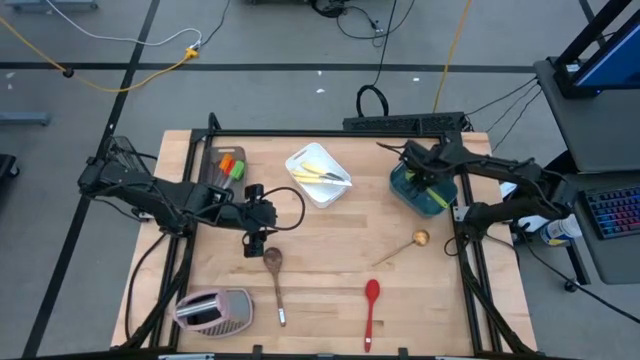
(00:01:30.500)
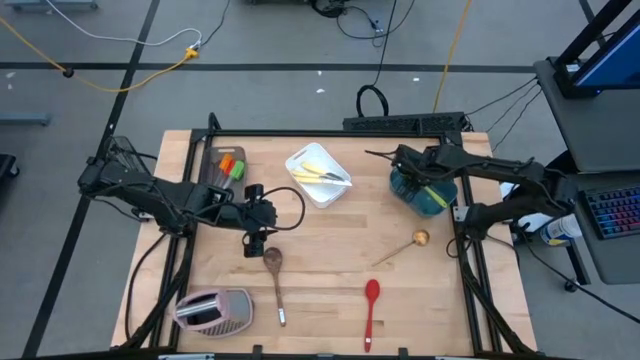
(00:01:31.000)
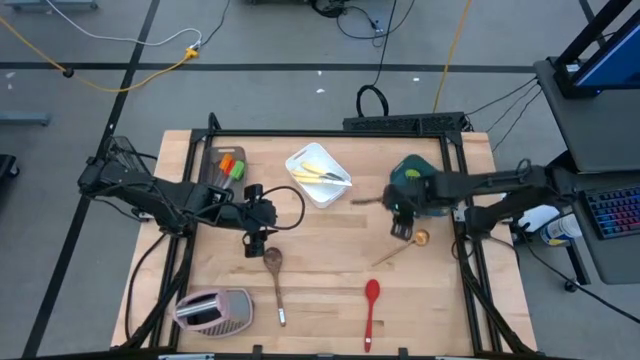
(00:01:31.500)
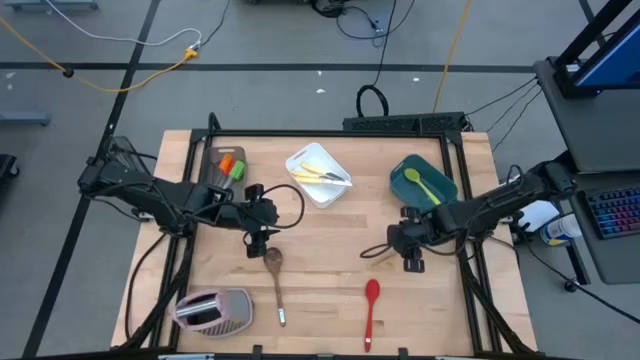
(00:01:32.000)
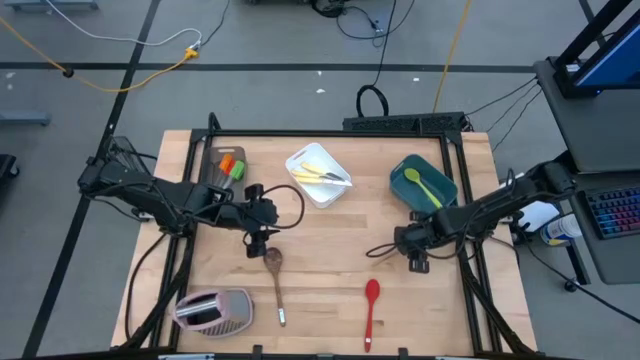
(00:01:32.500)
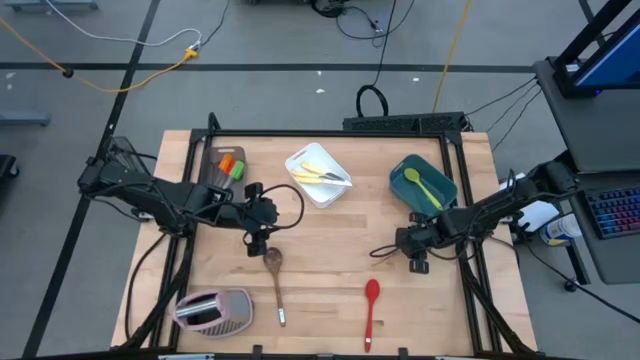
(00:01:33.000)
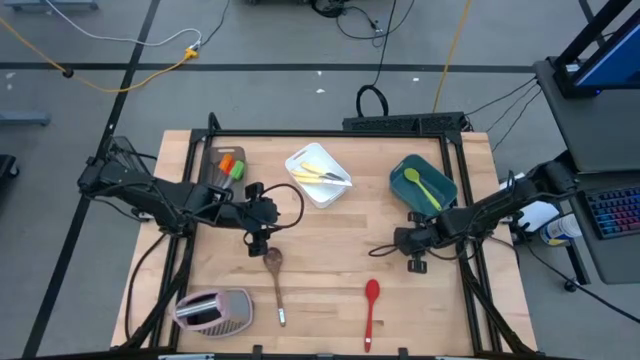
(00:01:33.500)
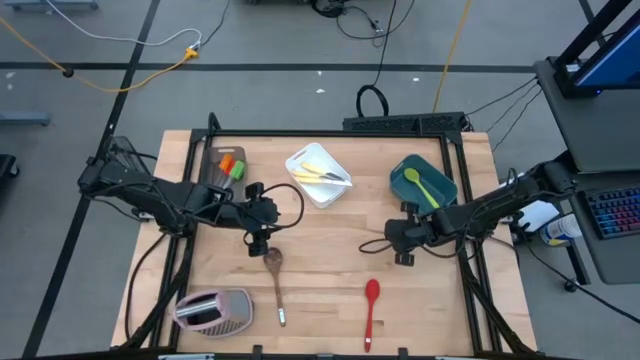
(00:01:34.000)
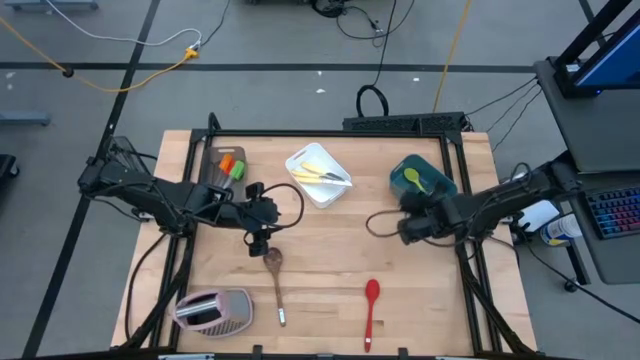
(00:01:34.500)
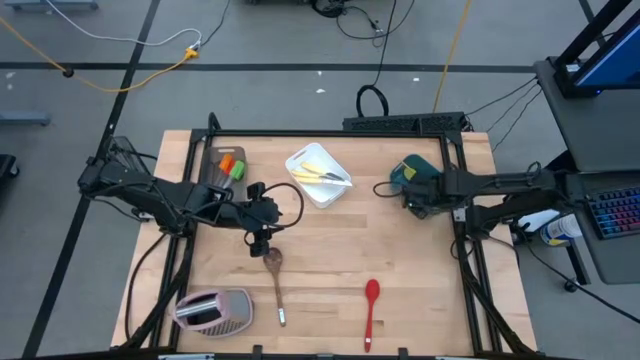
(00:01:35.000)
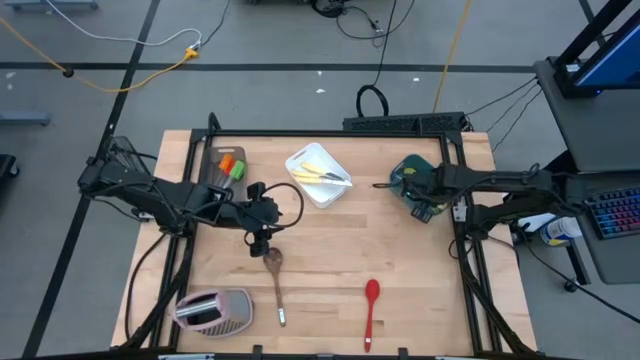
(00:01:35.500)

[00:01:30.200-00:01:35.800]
Task: Pick & Place Kitchen Items
Put the gold spoon into the blue bin

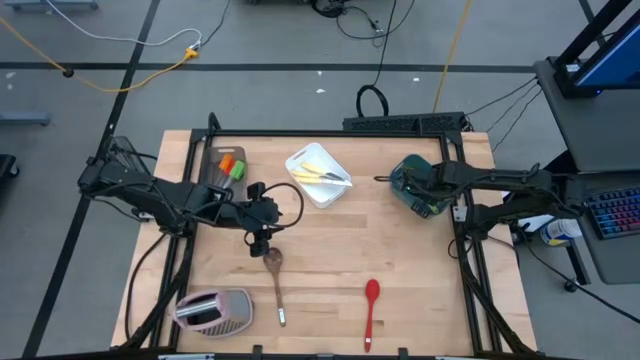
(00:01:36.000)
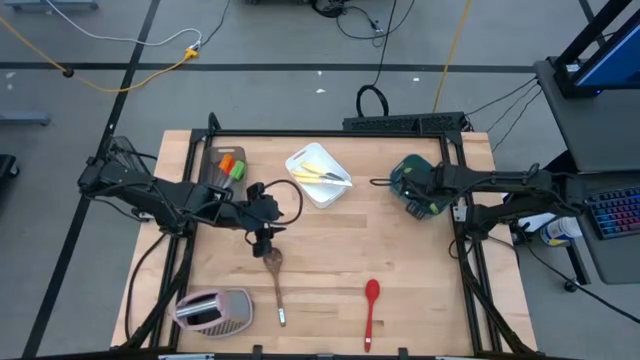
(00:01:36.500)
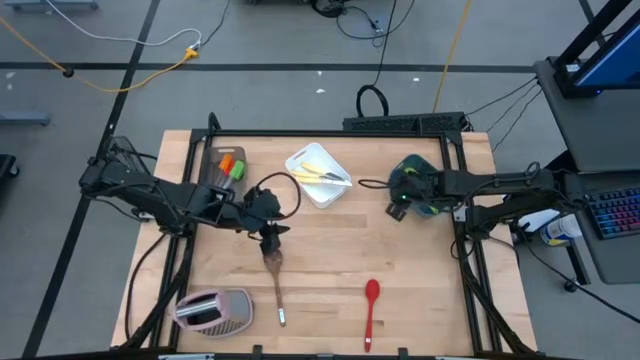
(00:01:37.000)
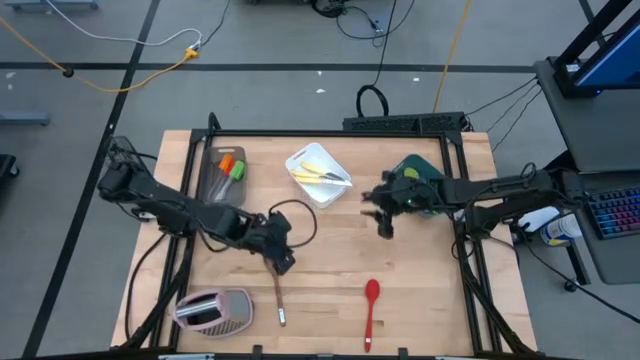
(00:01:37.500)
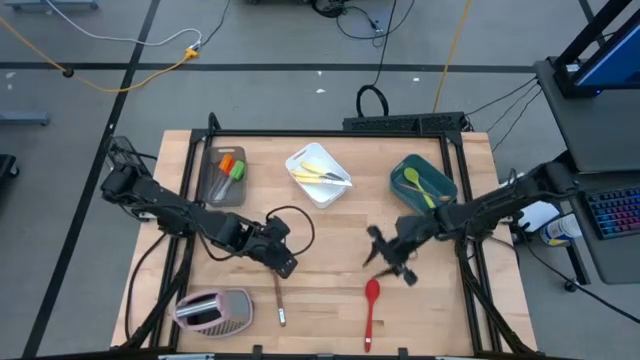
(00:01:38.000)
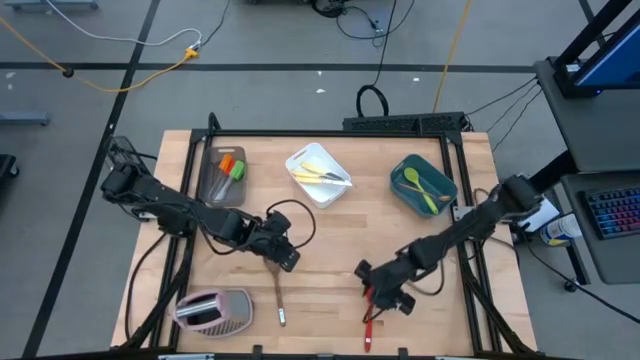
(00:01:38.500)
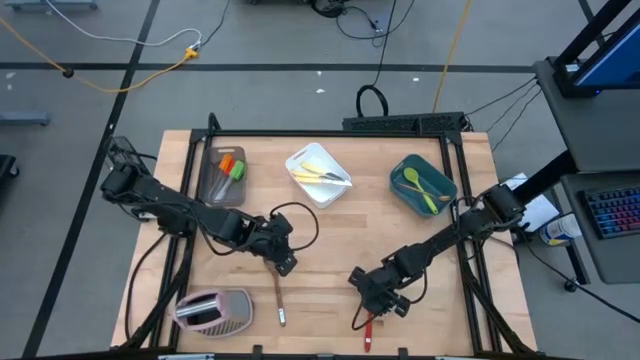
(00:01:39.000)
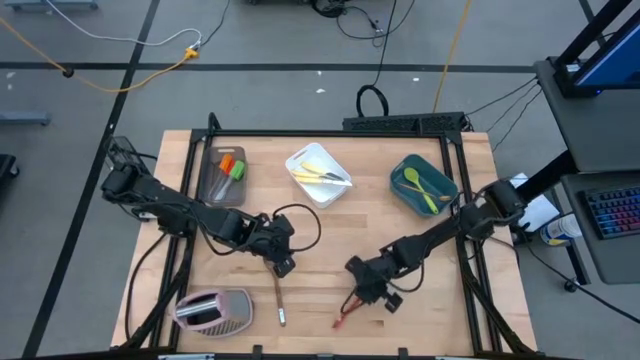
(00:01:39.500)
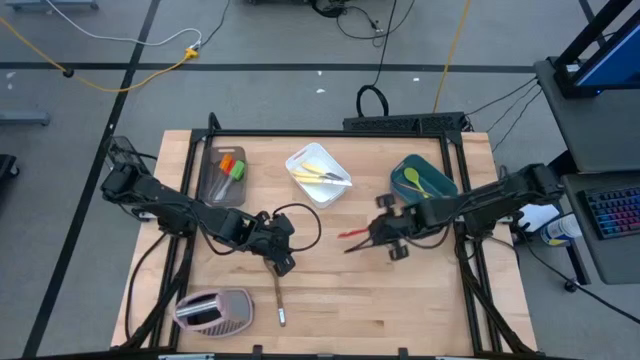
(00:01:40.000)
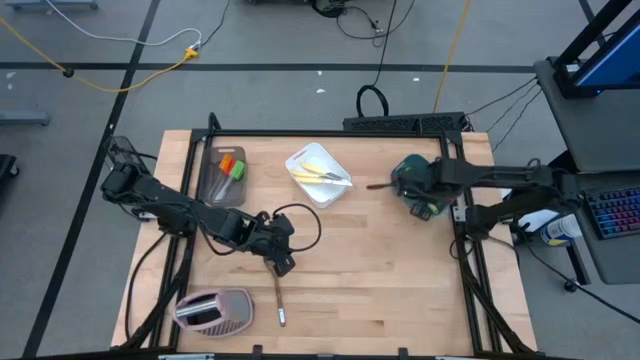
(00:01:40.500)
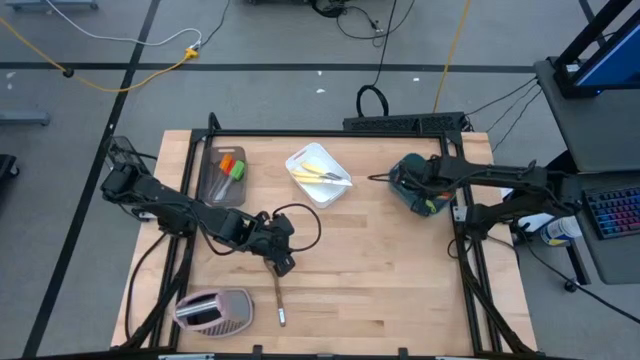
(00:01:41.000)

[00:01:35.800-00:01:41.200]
Put the red spoon into the blue bin

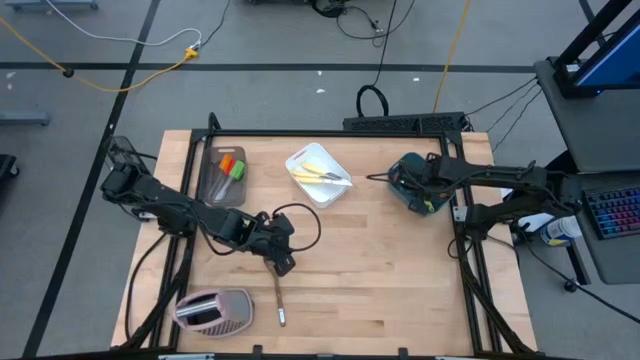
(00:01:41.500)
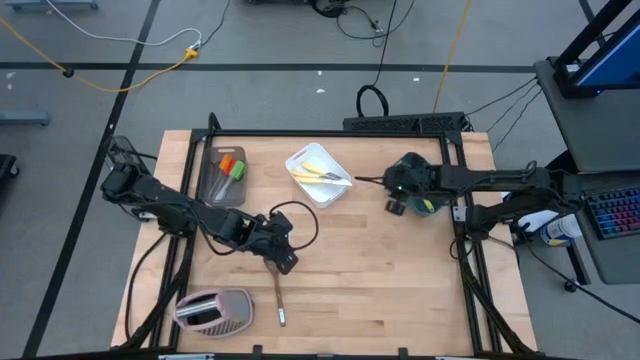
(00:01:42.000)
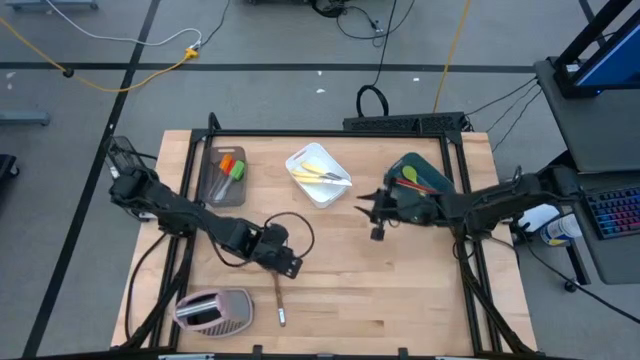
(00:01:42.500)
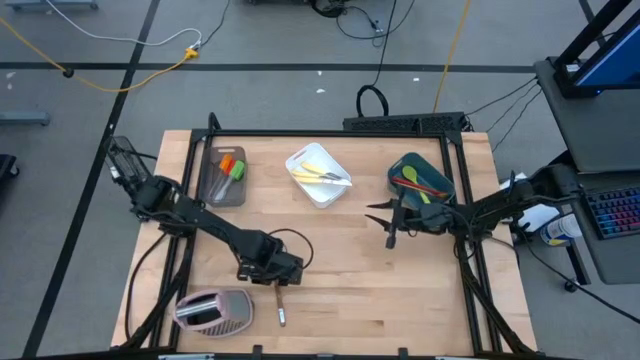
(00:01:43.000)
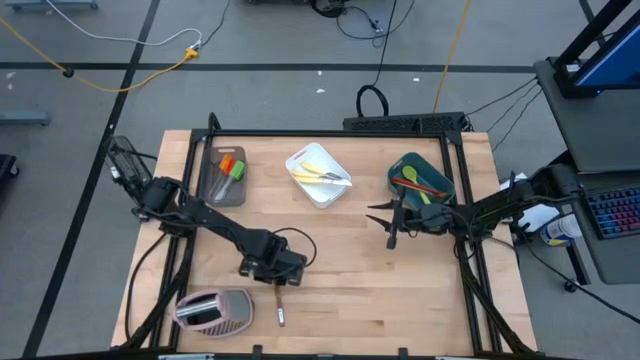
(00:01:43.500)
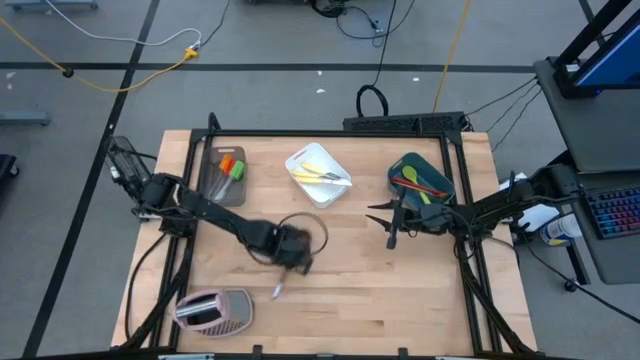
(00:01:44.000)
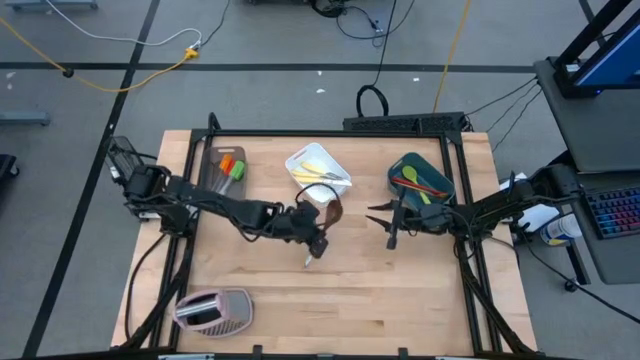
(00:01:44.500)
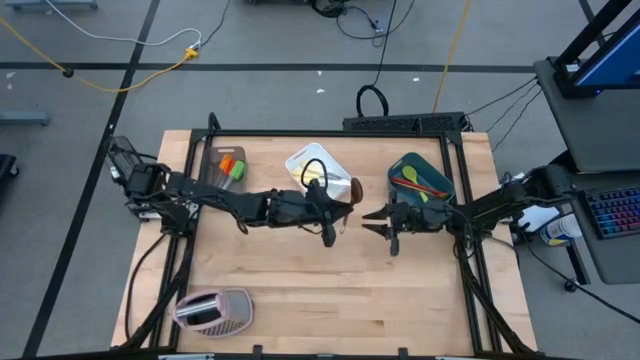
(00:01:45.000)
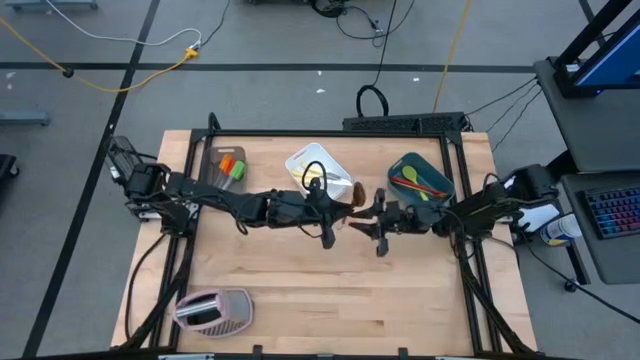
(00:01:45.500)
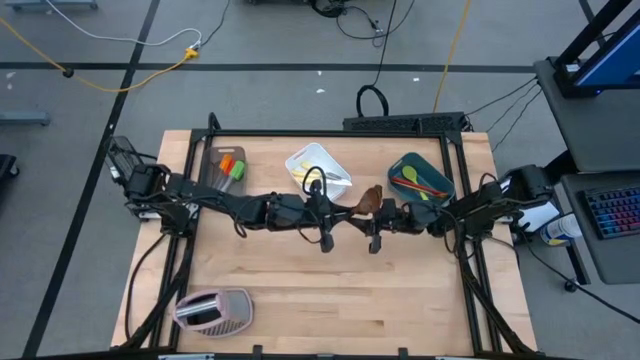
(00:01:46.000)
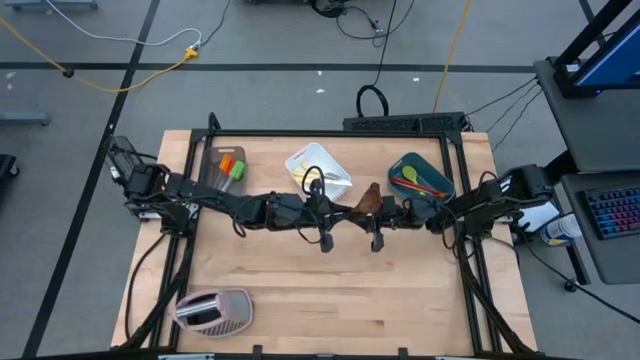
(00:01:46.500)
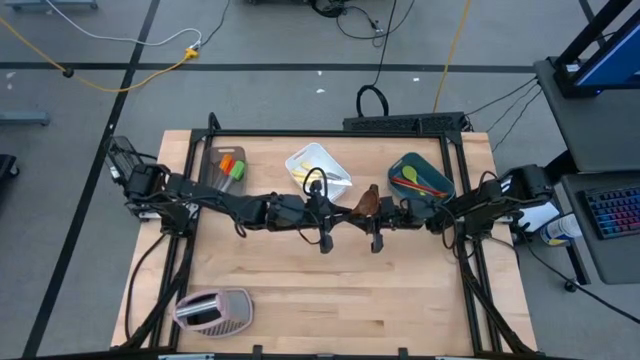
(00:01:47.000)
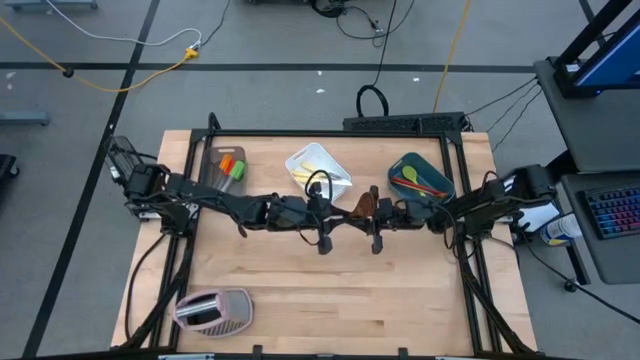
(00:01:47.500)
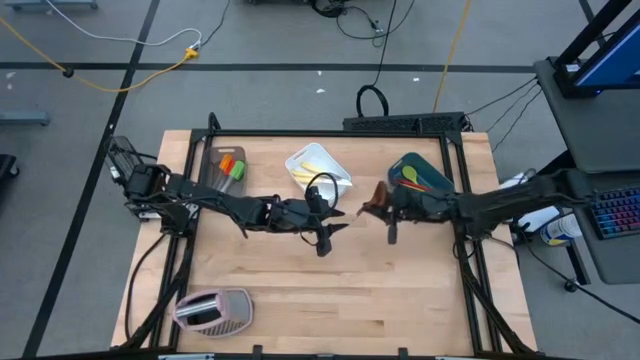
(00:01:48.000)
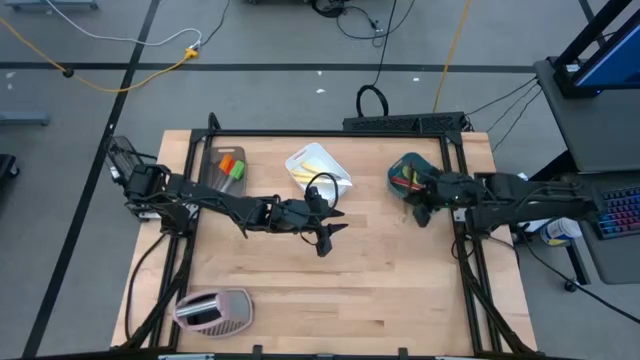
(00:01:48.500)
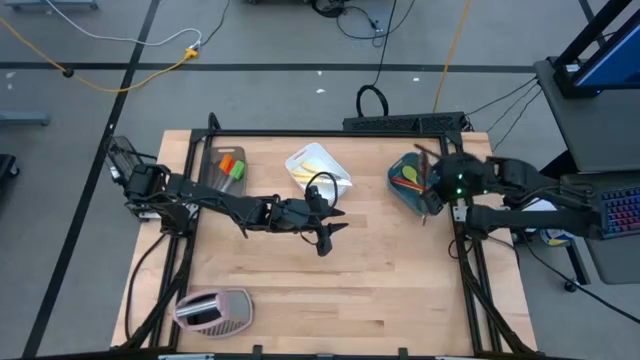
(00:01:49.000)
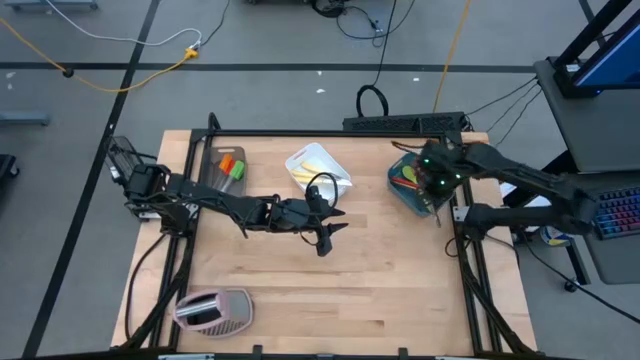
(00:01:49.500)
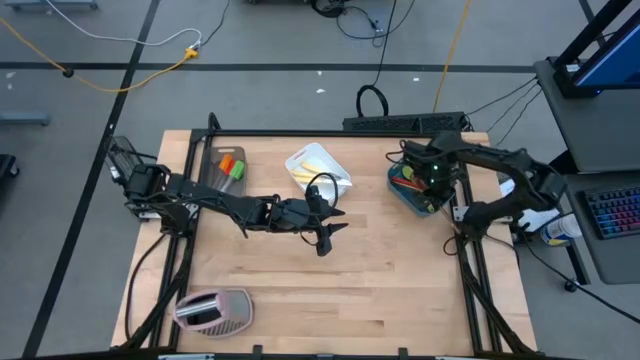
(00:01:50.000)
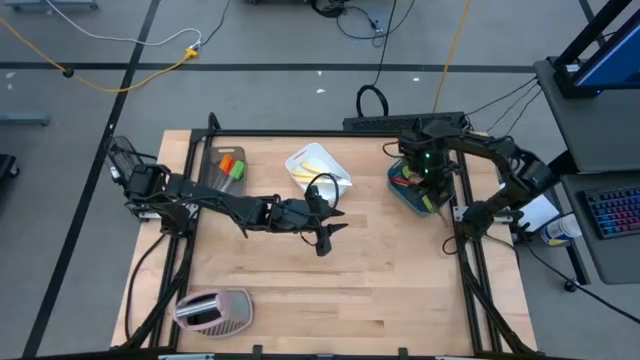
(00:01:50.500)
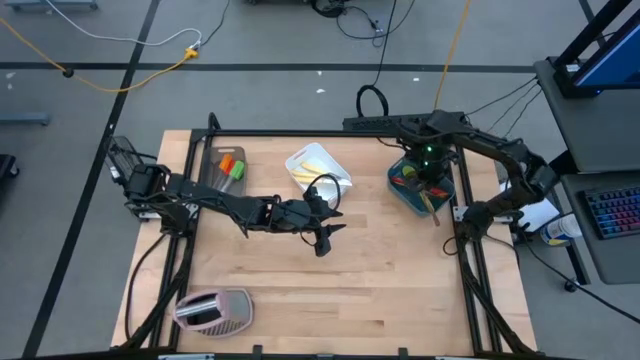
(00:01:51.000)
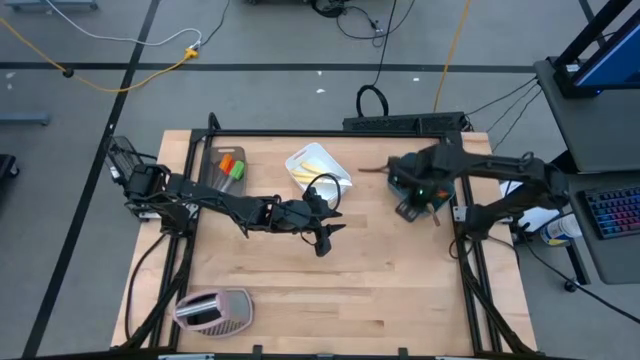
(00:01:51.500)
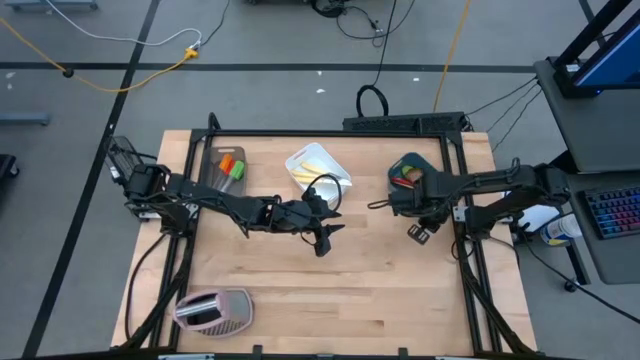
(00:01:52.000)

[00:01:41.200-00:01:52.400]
Put the brown spoon into the blue bin
